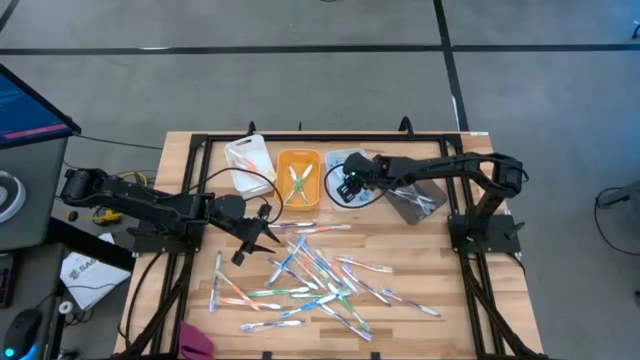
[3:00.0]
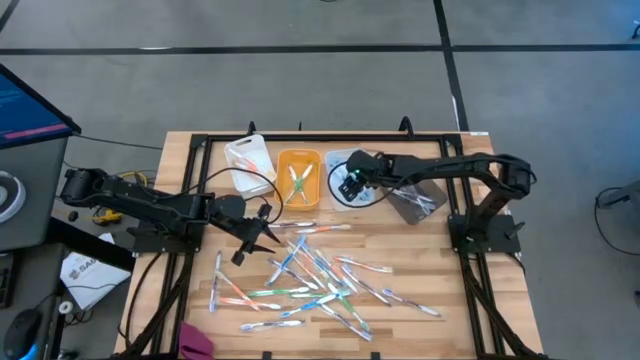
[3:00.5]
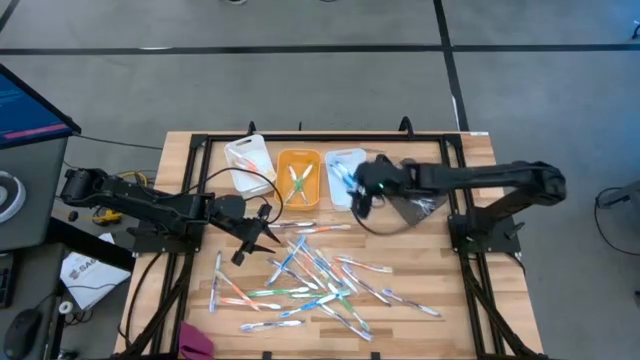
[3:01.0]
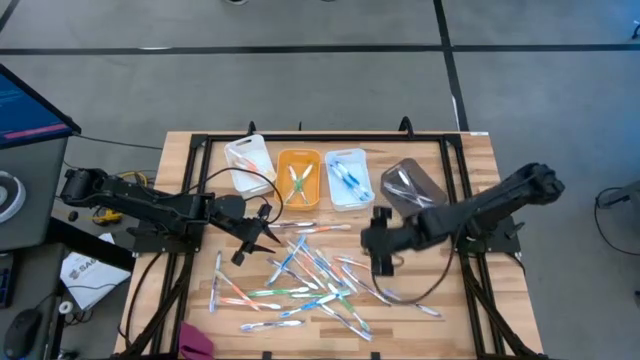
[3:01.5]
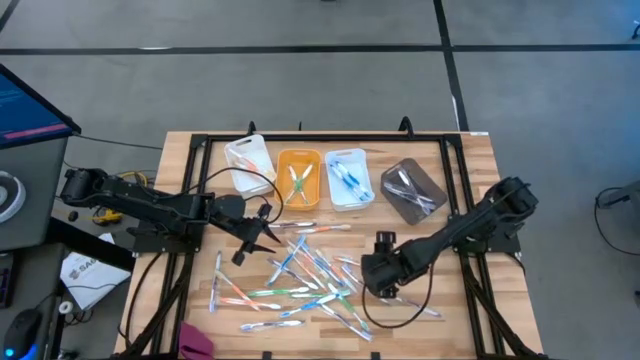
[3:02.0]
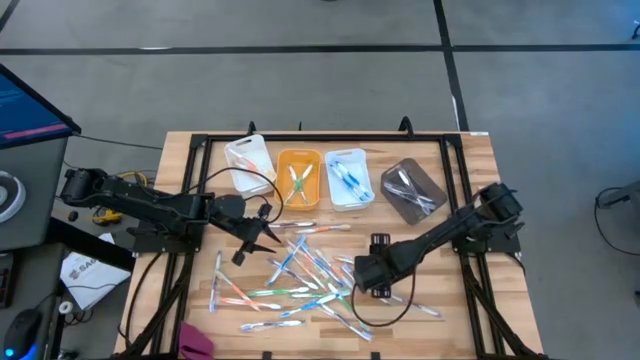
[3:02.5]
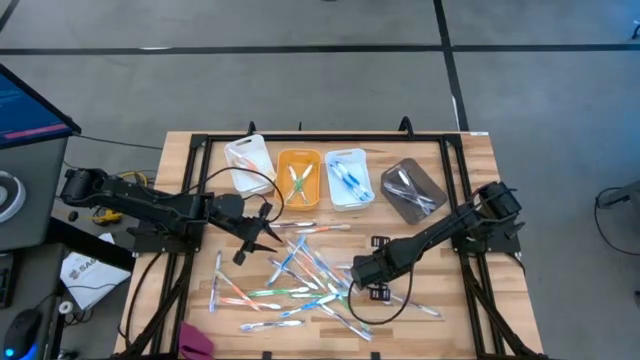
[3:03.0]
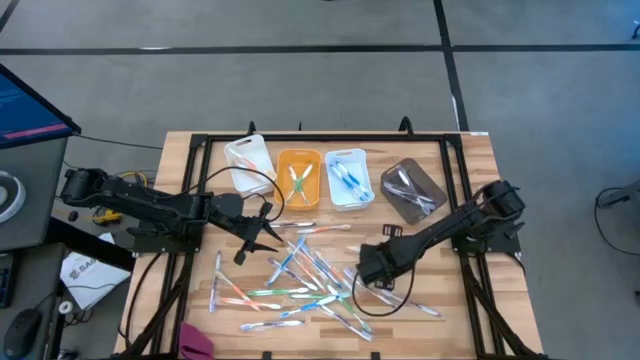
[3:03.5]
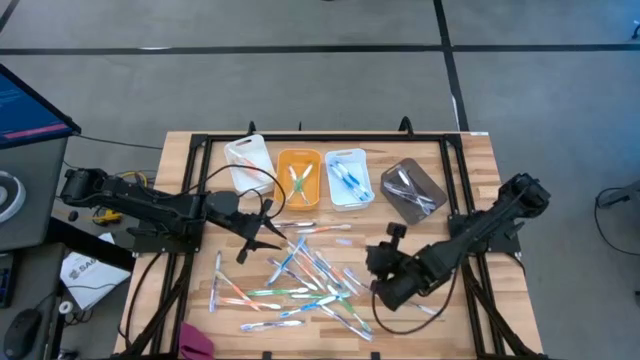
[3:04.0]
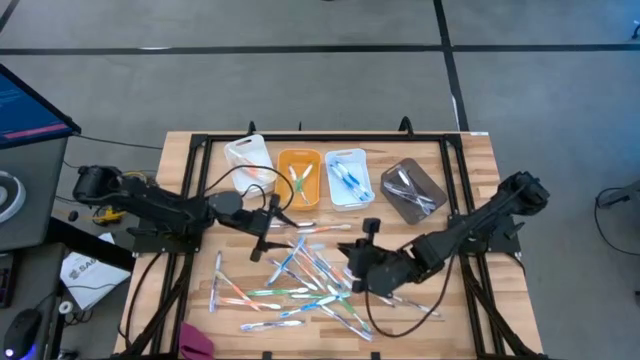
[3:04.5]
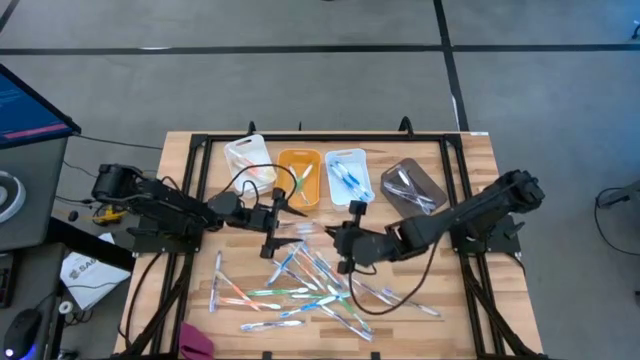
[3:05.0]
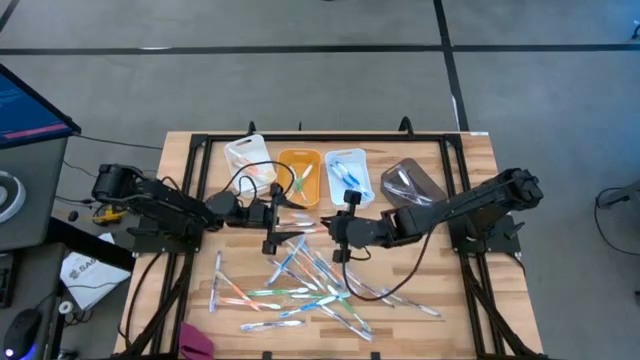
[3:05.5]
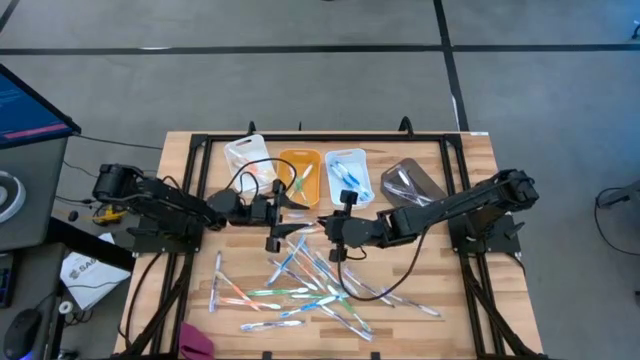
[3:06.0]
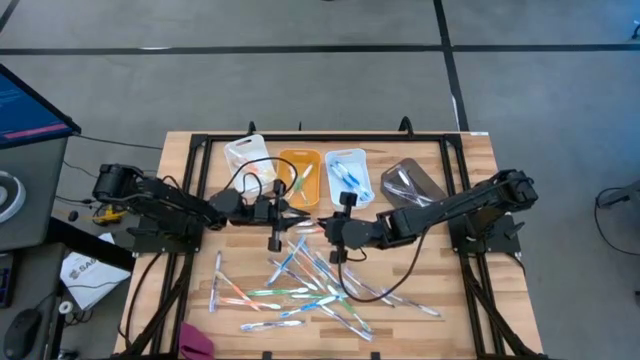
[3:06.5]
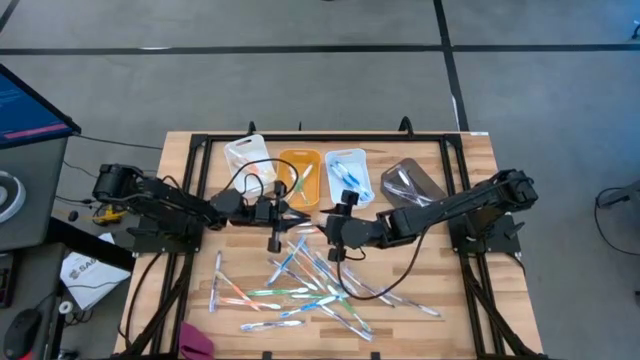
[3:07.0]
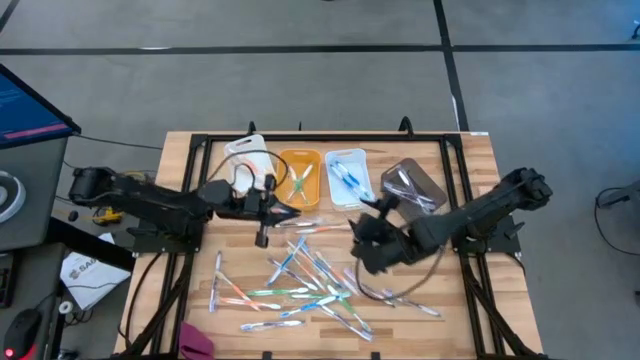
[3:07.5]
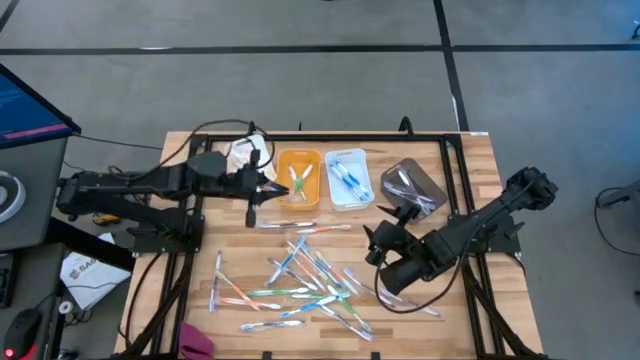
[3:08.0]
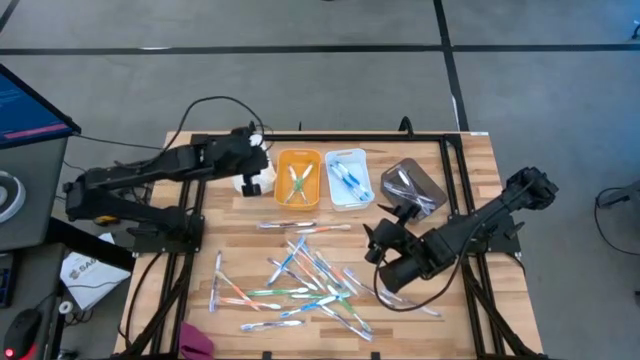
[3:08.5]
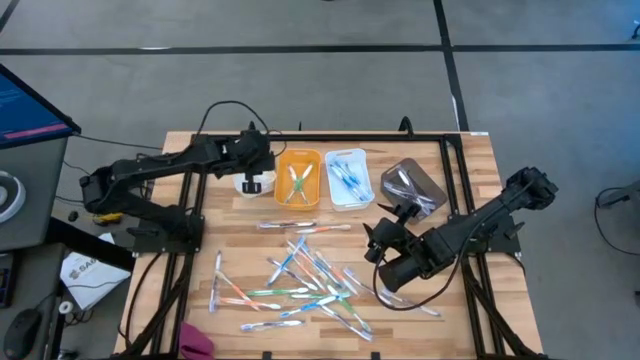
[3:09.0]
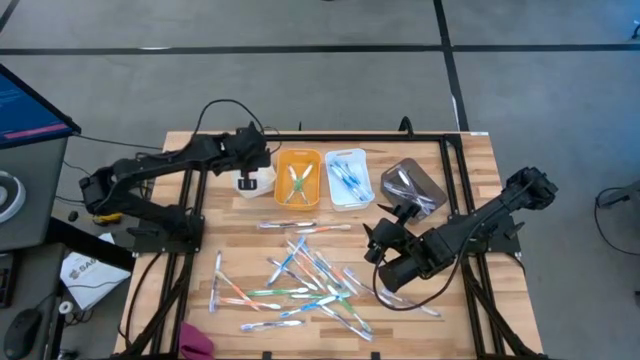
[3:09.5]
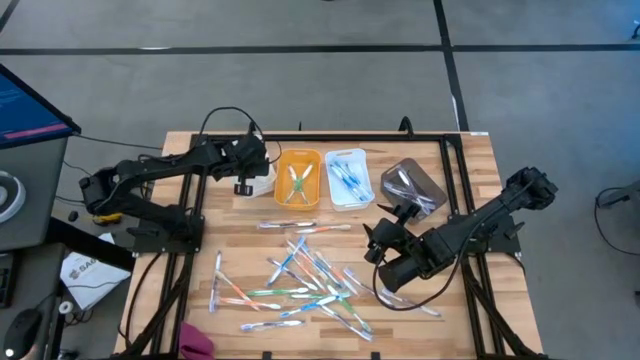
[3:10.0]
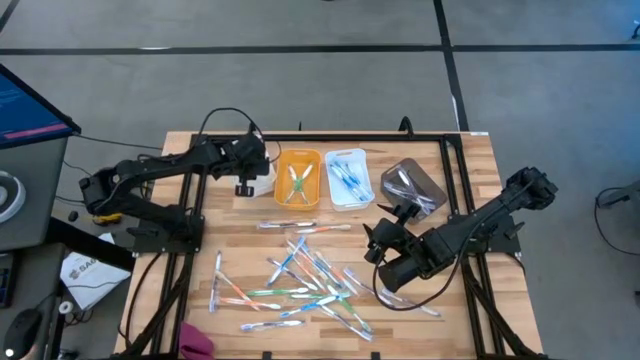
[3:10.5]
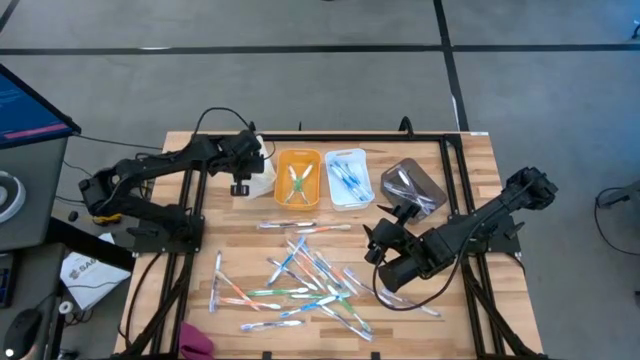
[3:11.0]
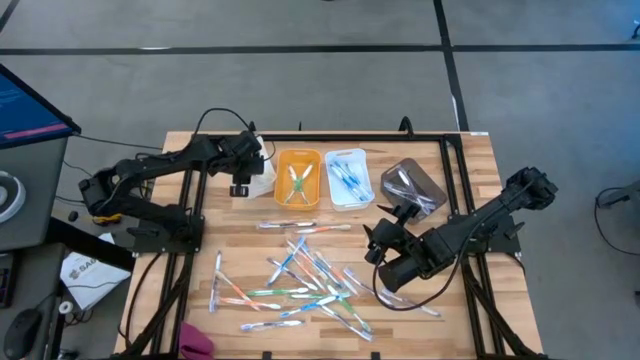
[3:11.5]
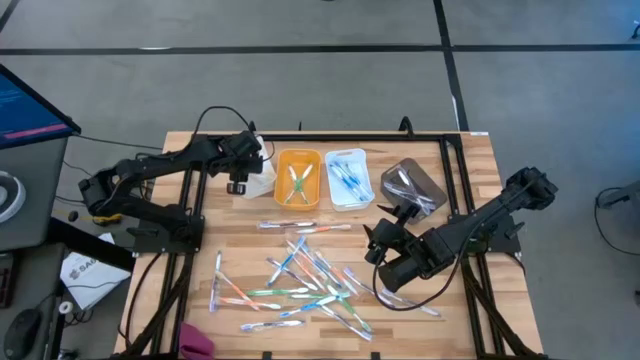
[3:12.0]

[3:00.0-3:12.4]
Task: Pick & Place Toothbrushes
Put the white orange toothbrush into the left white bin

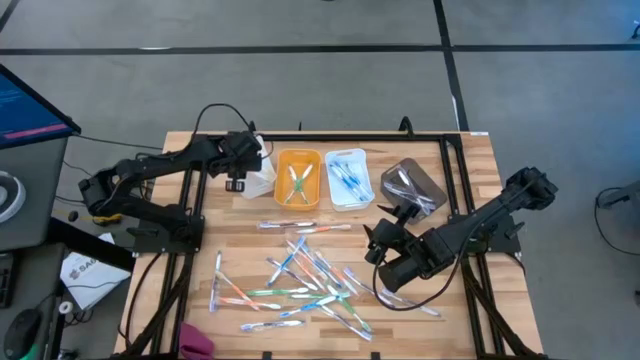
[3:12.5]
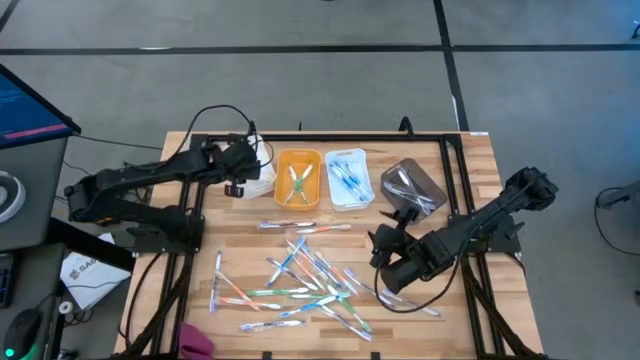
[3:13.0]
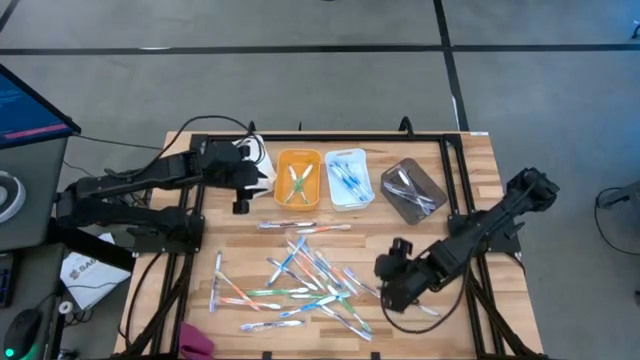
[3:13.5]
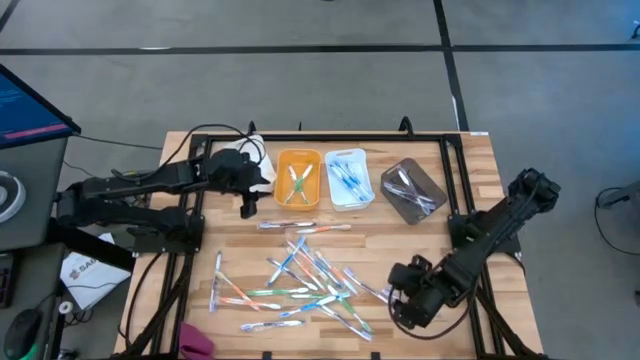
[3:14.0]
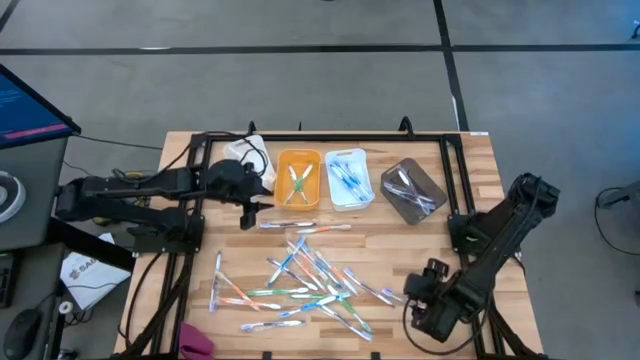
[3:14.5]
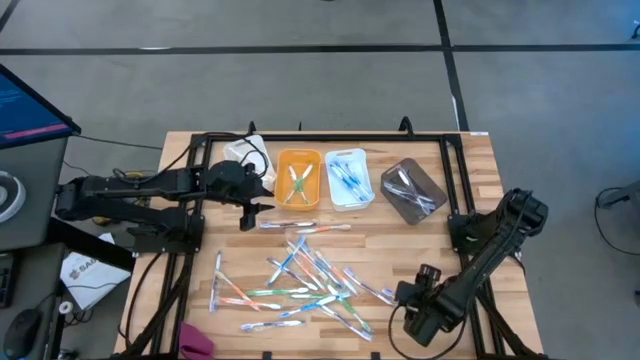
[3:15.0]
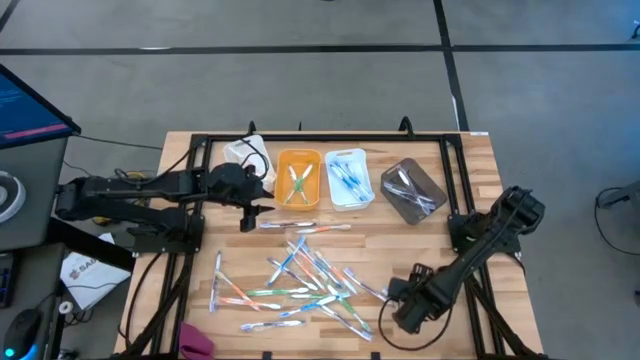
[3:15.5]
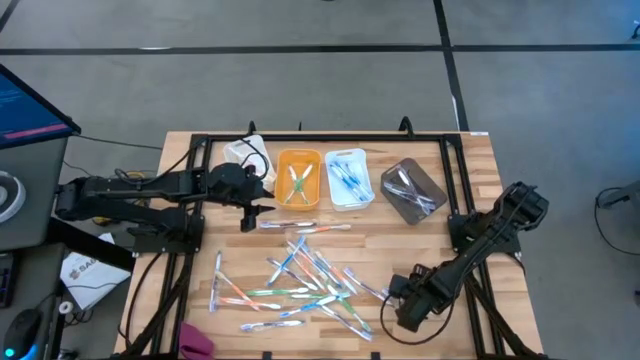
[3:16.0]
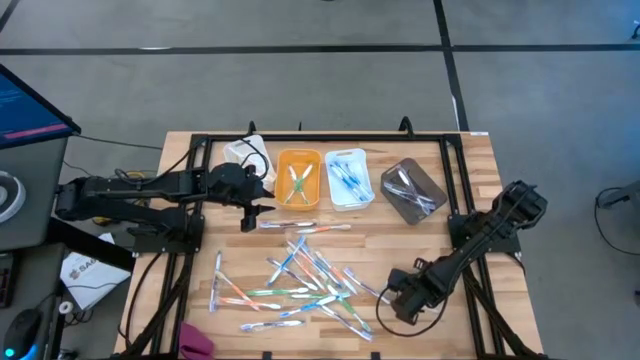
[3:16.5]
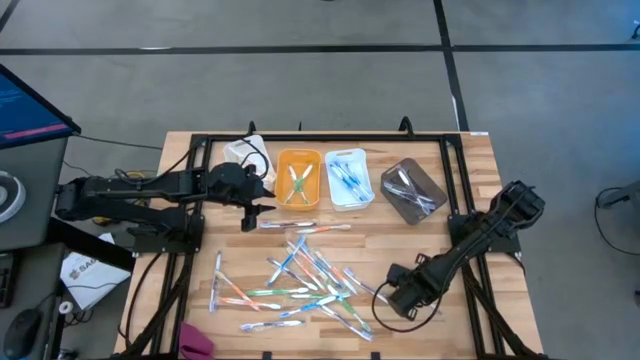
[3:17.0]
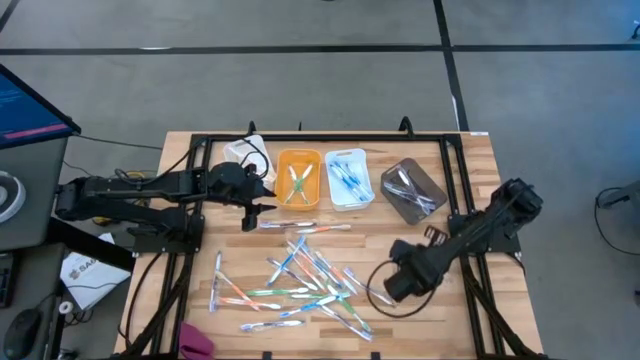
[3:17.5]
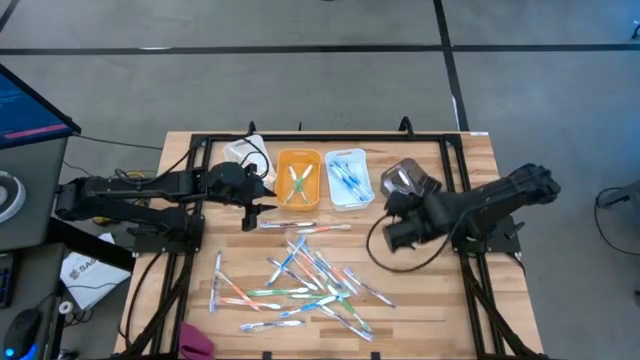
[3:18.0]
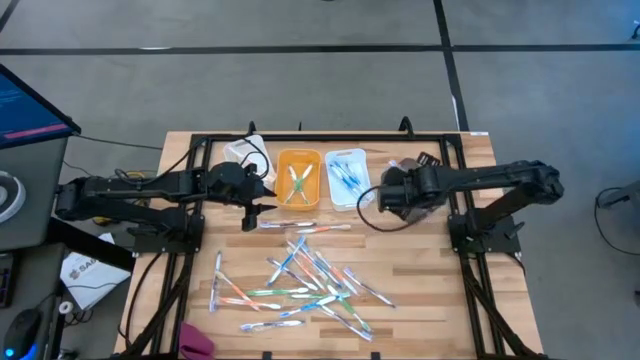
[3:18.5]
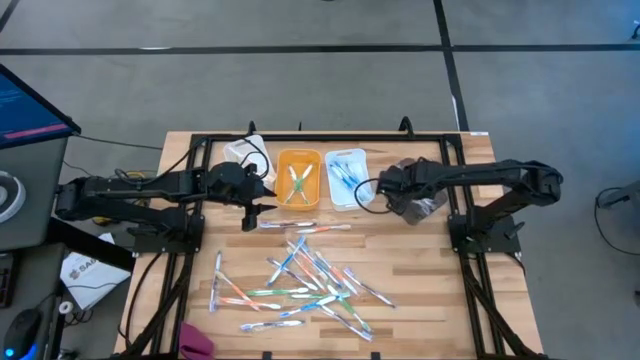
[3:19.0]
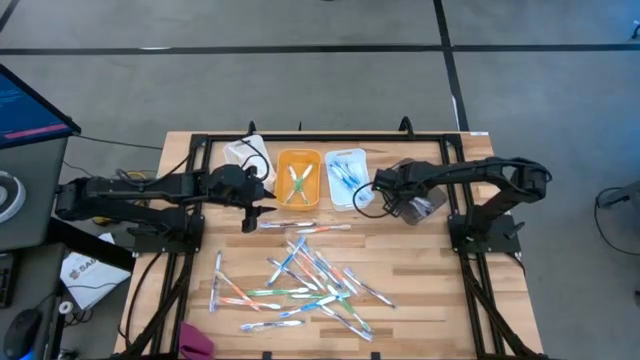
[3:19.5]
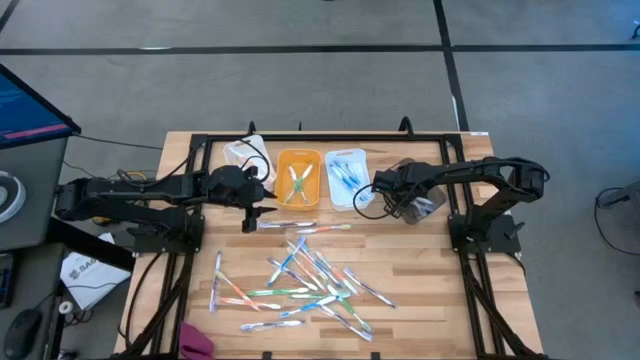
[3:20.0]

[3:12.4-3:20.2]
Put the white violet toothbrush into the black transparent bin

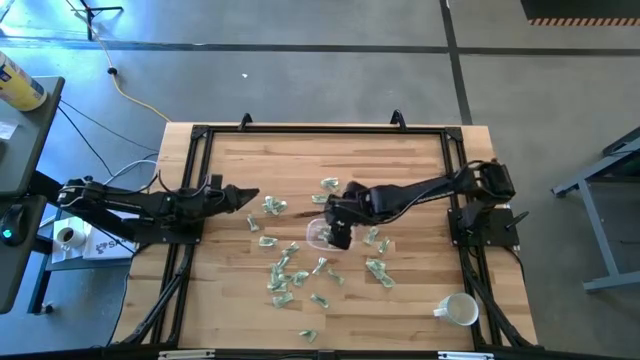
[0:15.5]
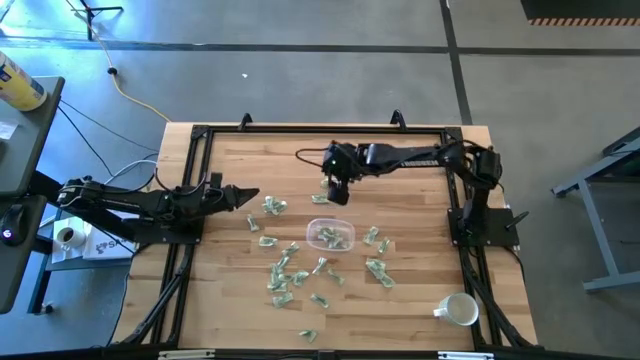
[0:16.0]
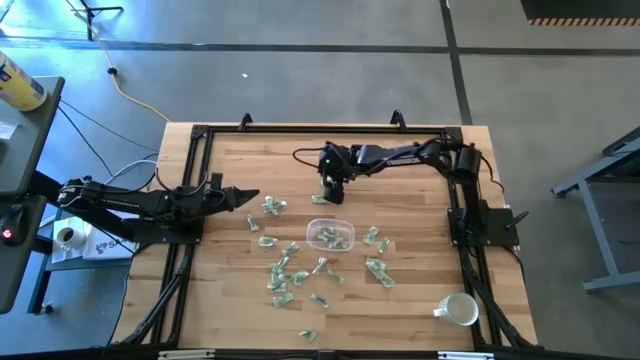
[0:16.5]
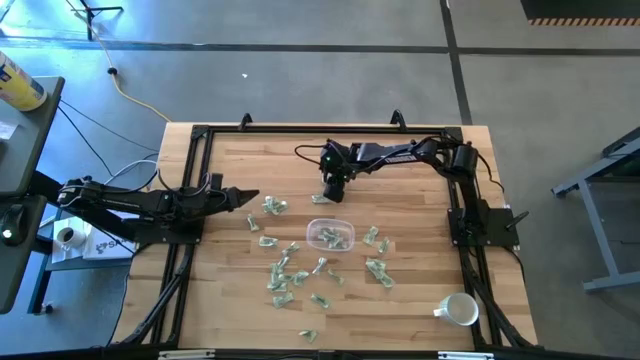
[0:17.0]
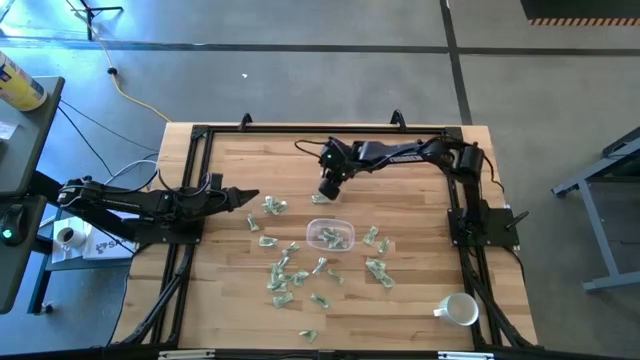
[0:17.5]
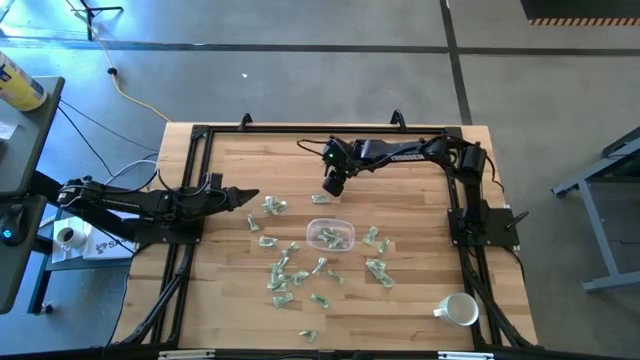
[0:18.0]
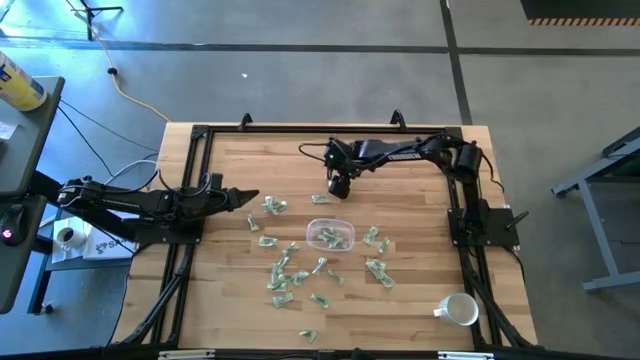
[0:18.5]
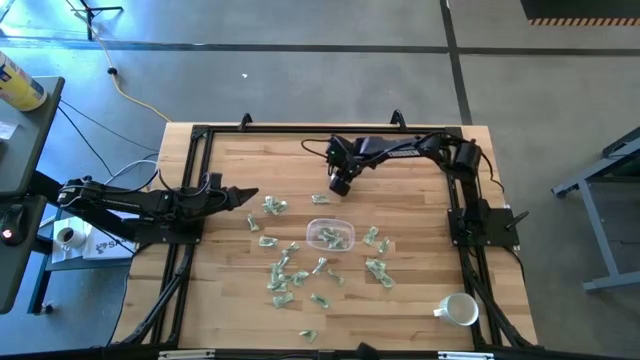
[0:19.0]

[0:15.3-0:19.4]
Task: Pick and place Stevia / Truvia into bins
Put the green stevia packet into the transparent container
